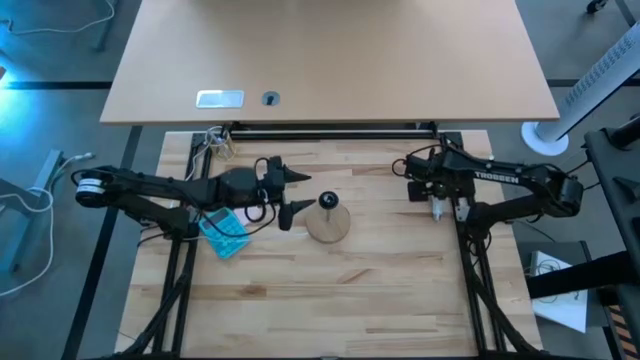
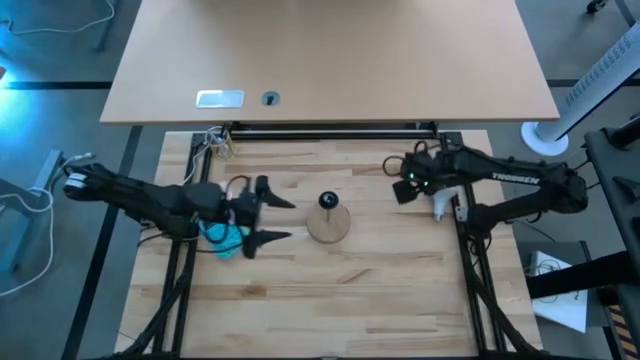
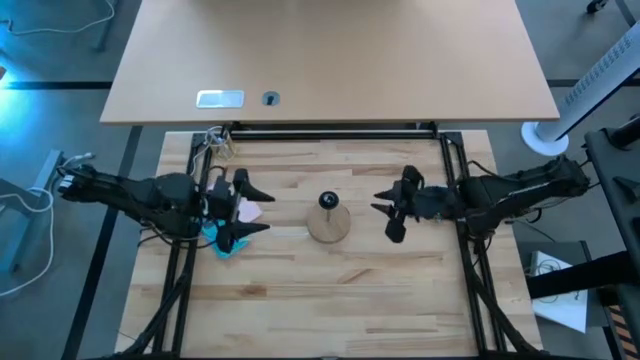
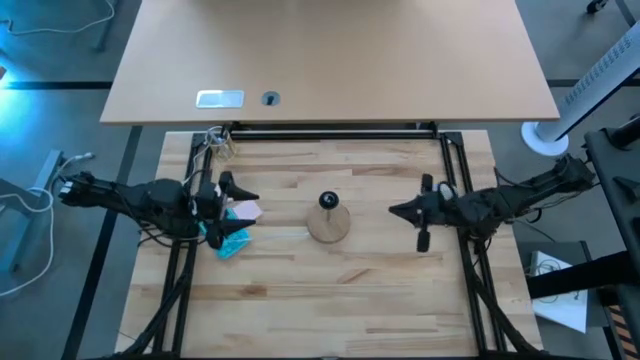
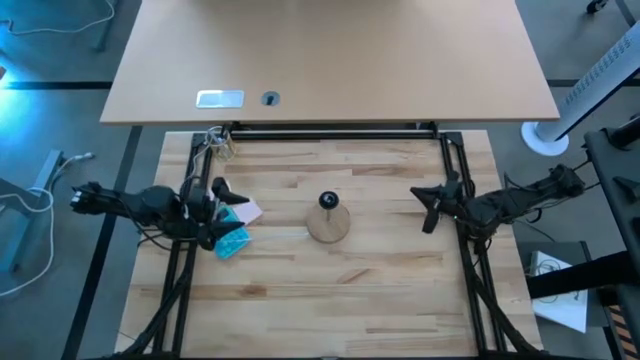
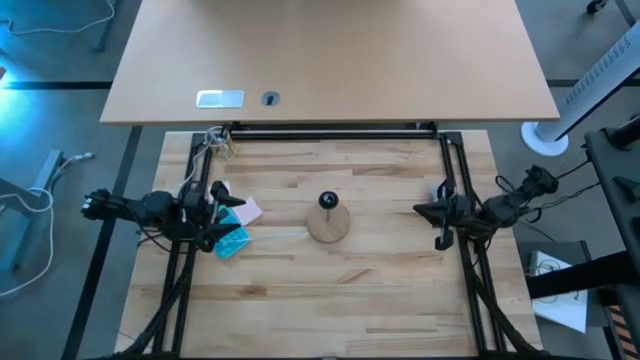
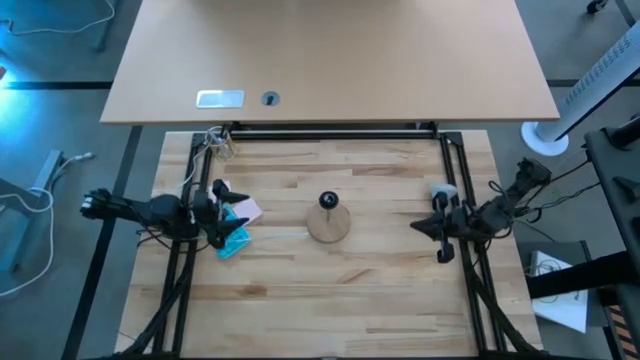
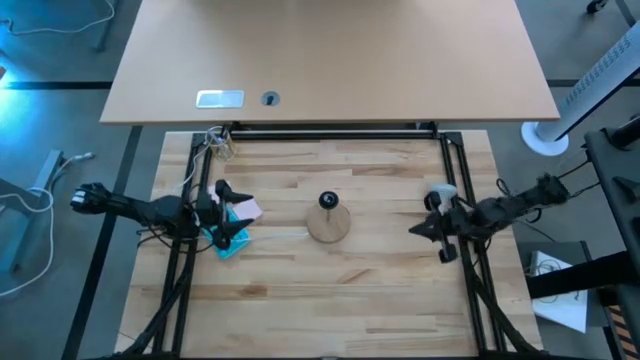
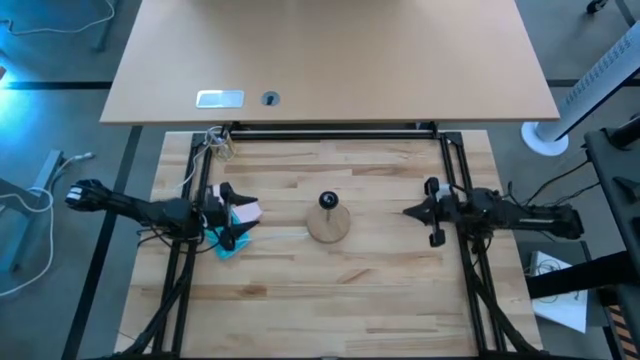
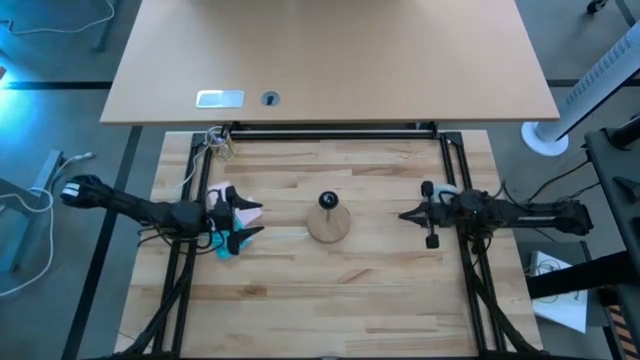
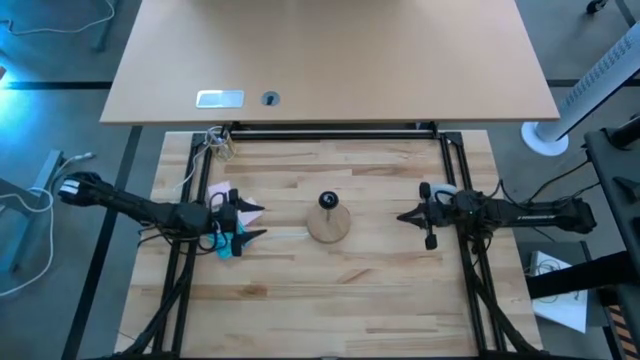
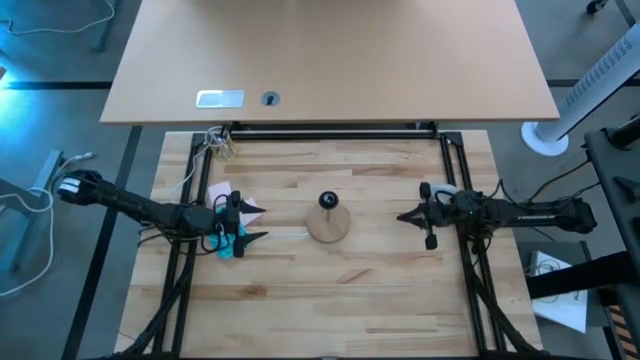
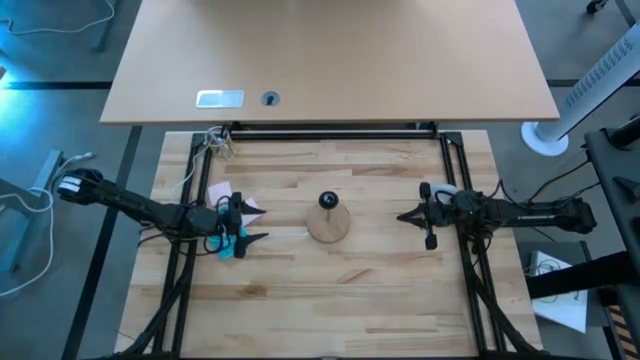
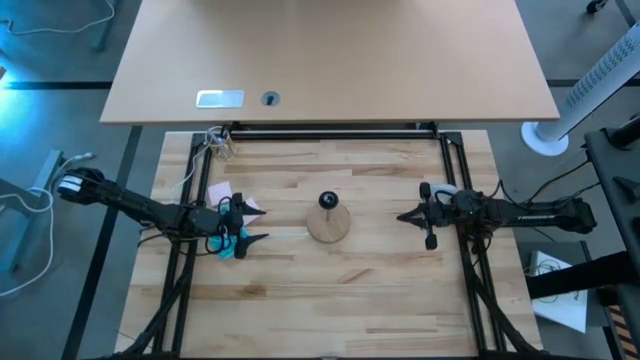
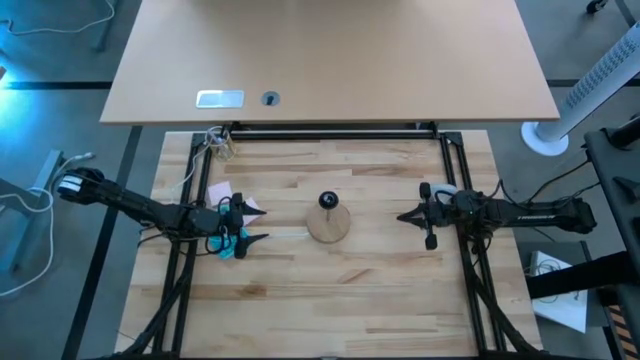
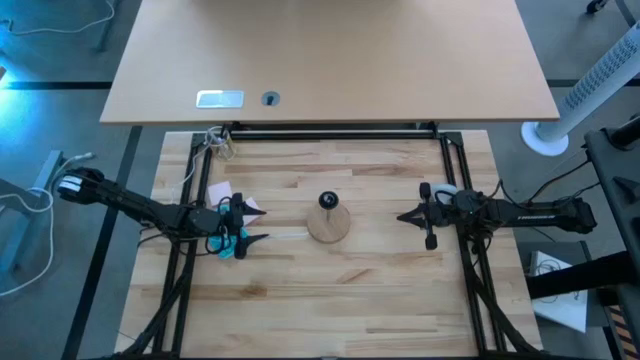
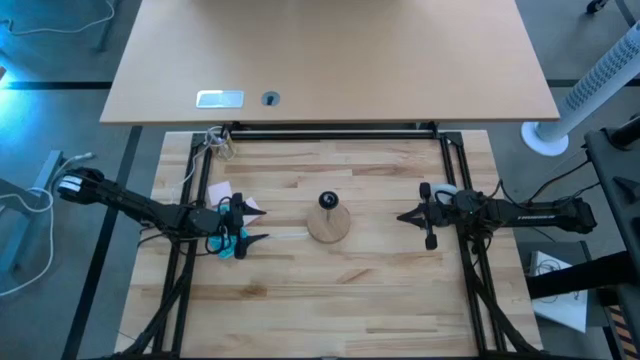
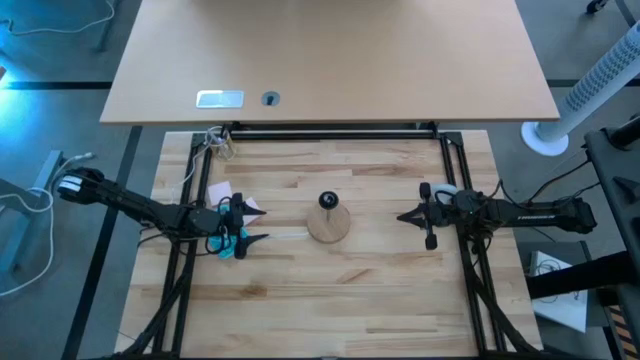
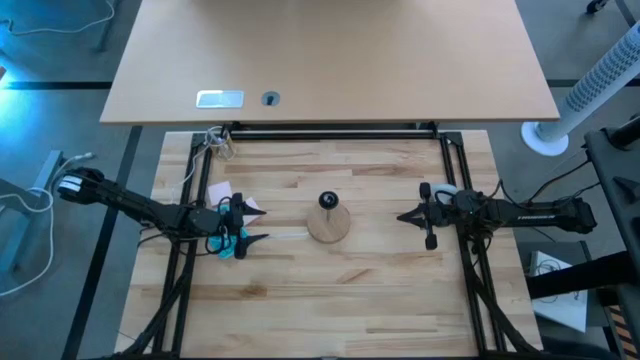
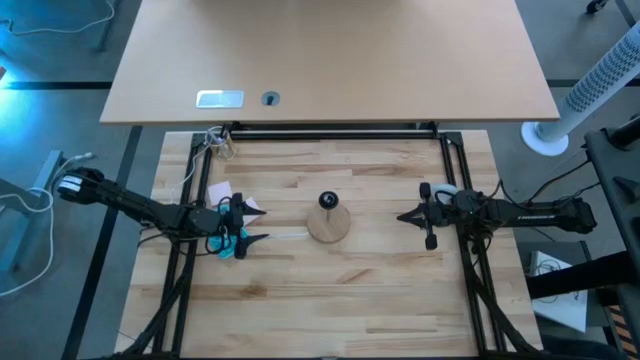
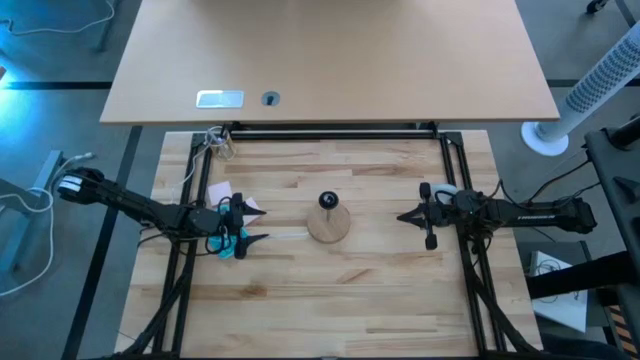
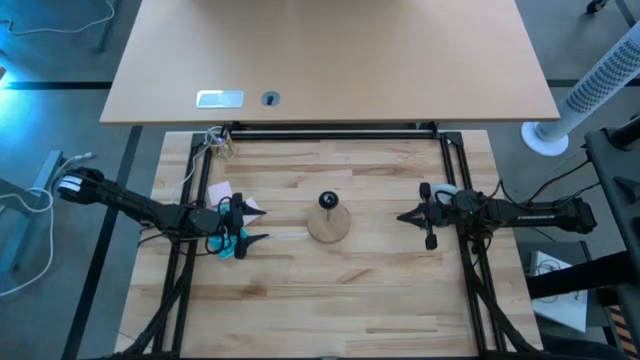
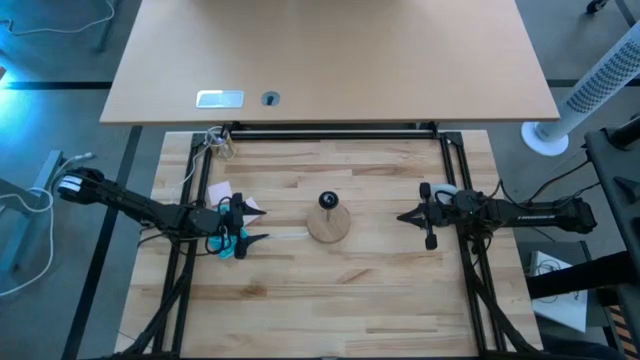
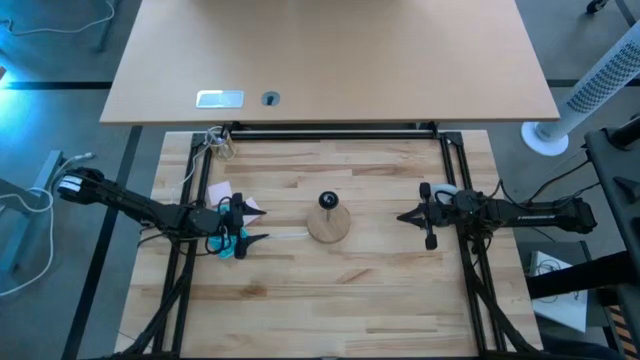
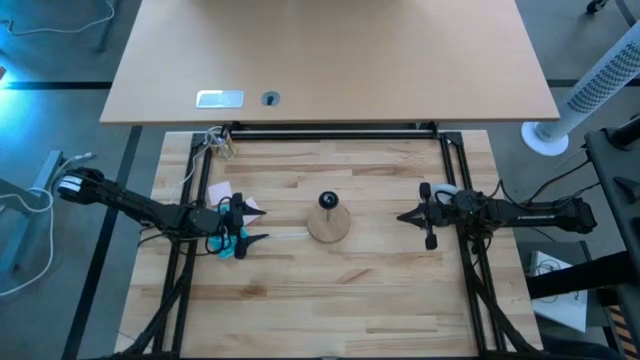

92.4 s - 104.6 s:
Task: Screw lightbulb
Return to Home Position

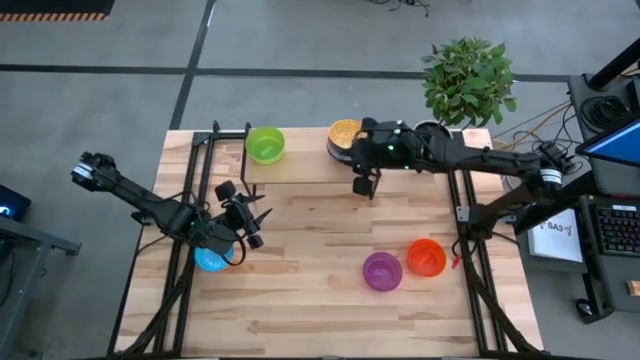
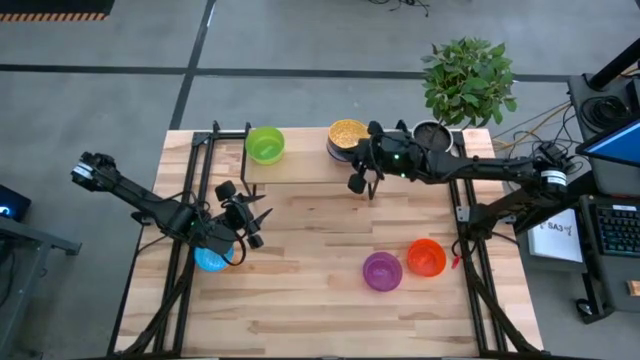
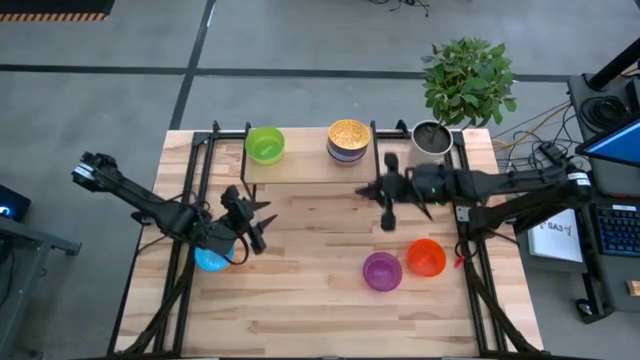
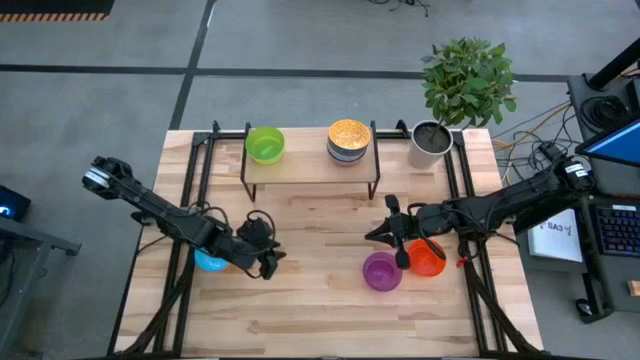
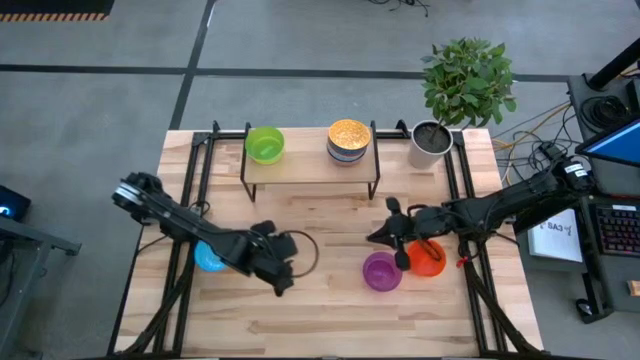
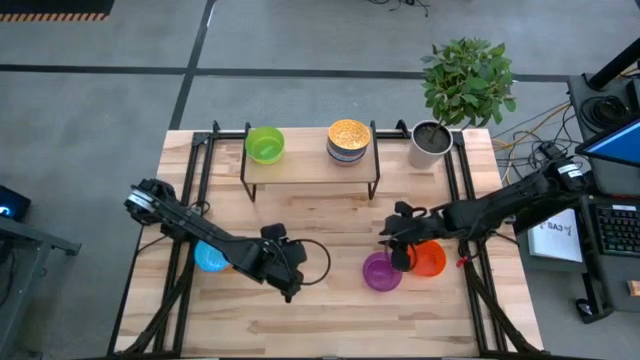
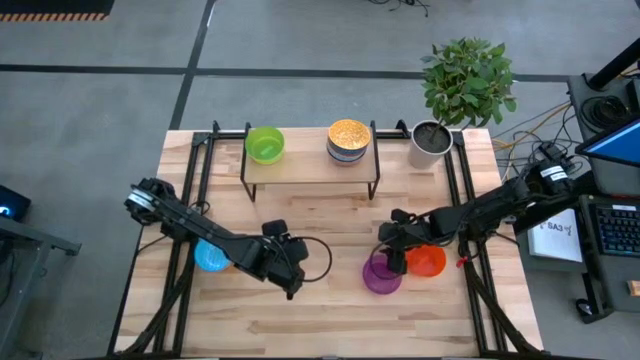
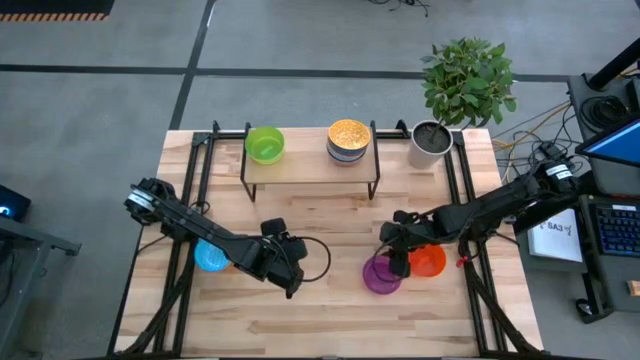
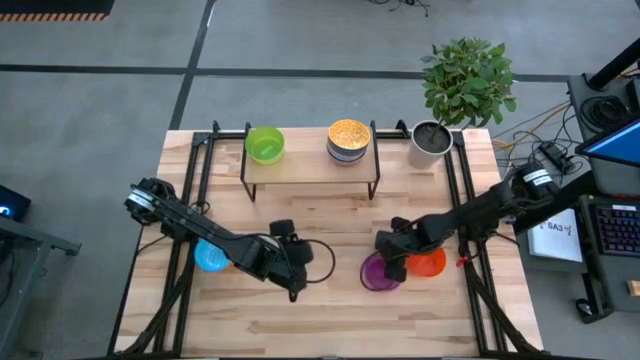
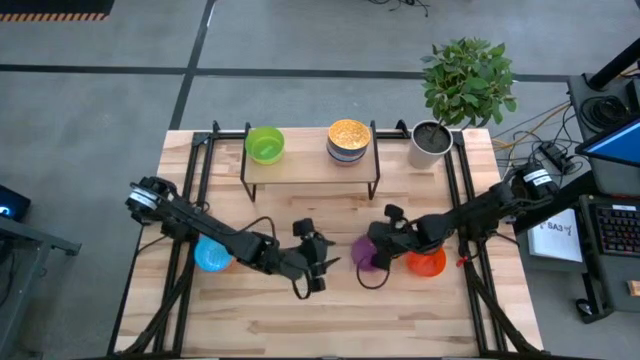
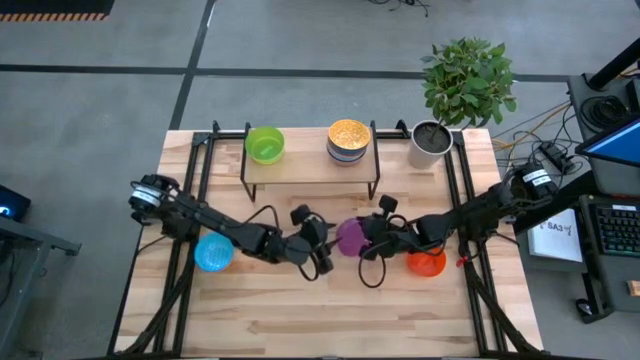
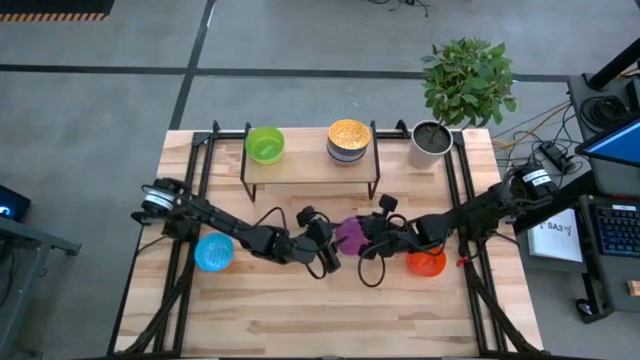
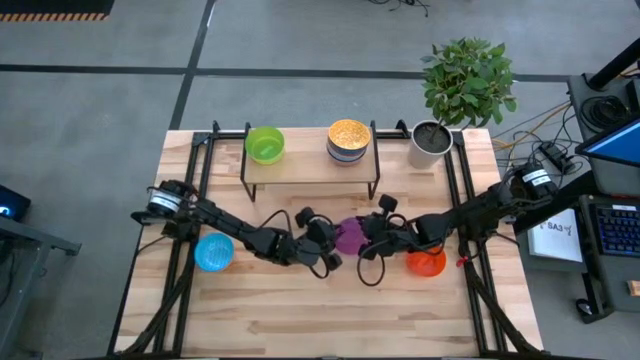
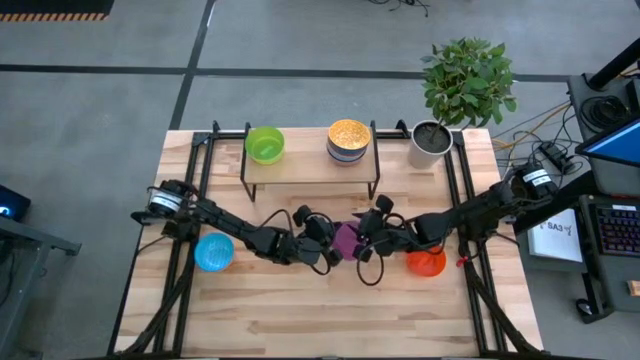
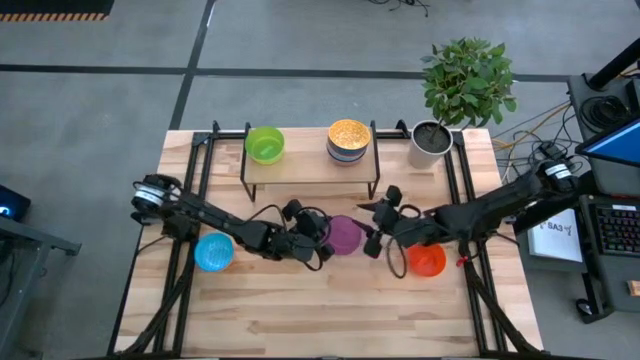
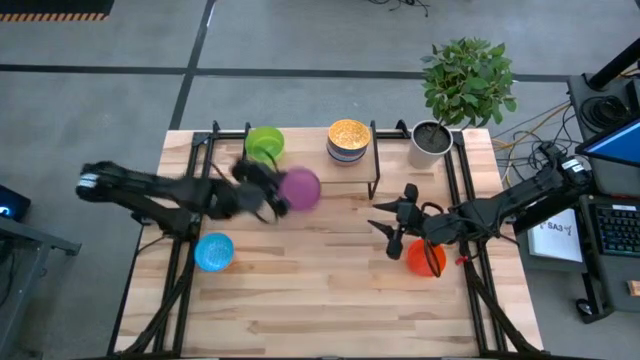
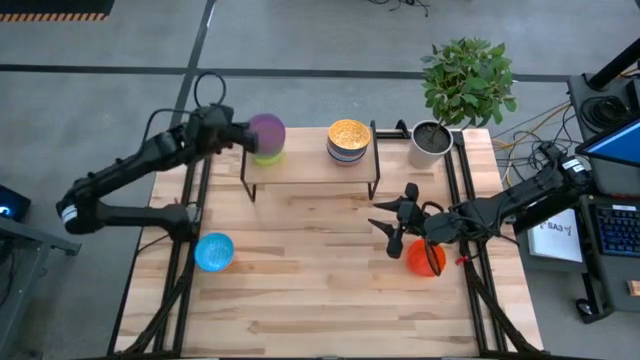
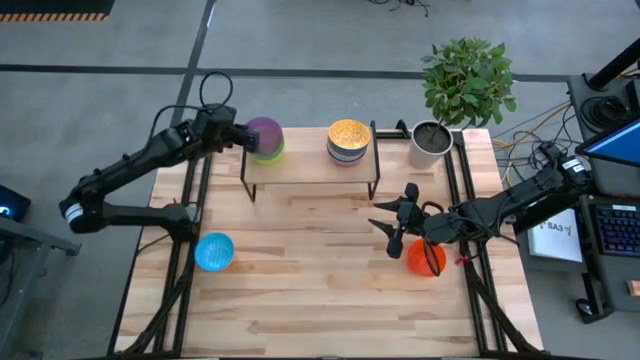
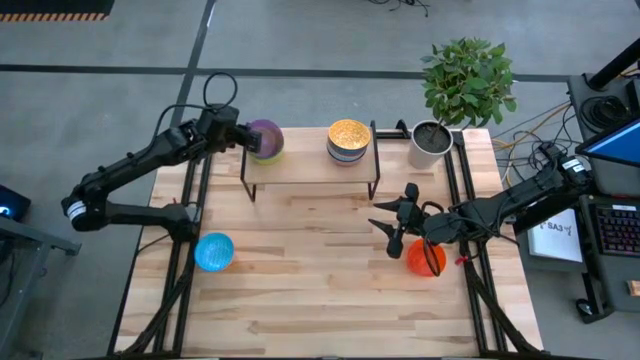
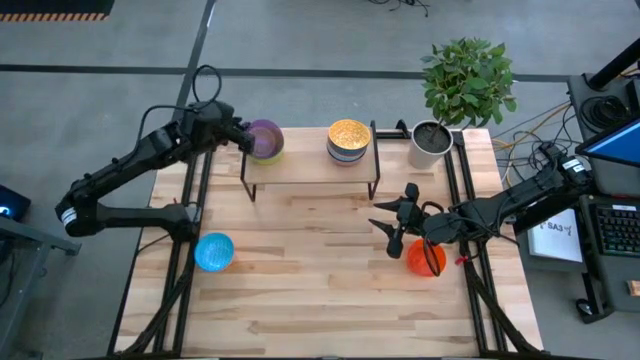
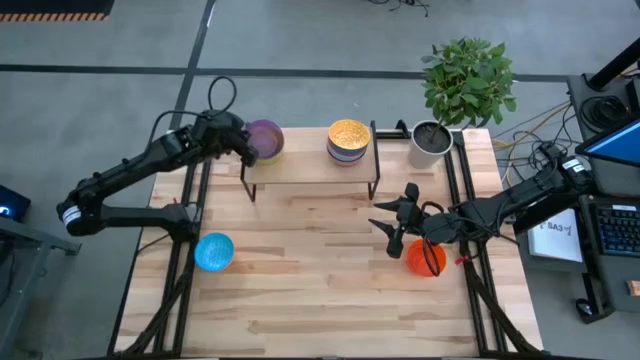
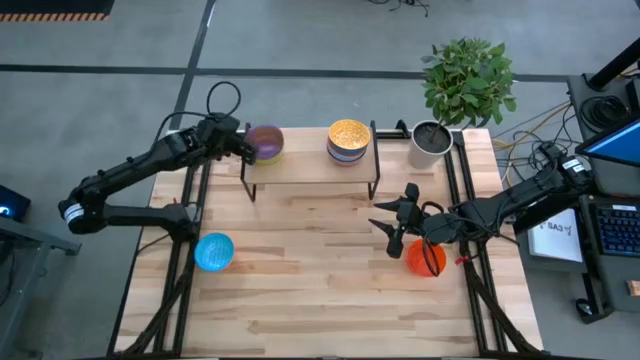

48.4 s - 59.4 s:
Task: Place and stack bowls onto a shelf
Stack the violet bowl on the top of the green bowl on the shelf
